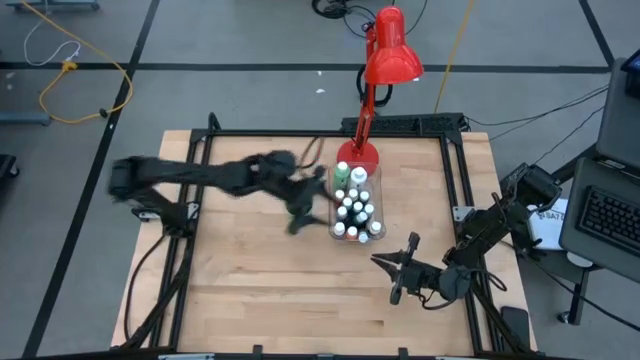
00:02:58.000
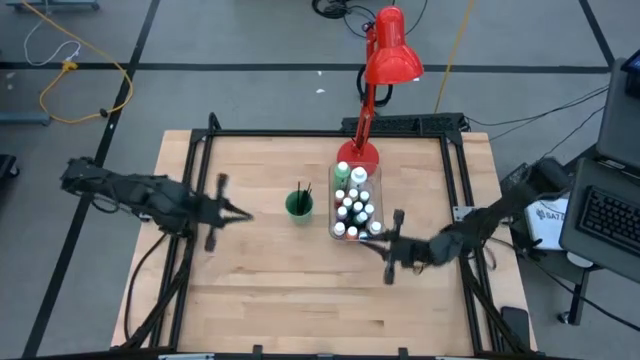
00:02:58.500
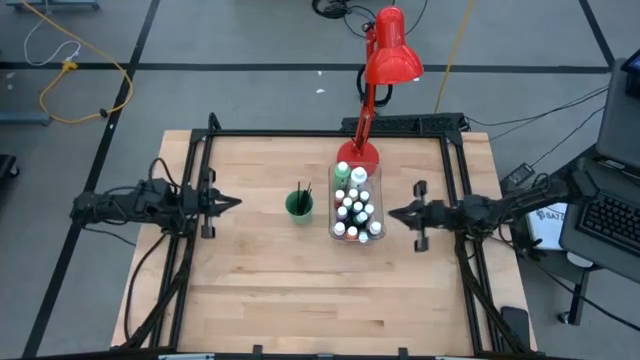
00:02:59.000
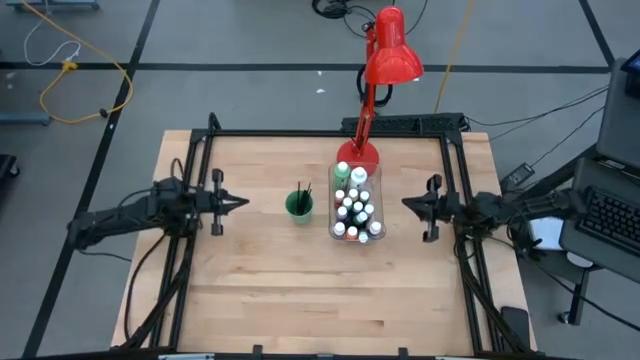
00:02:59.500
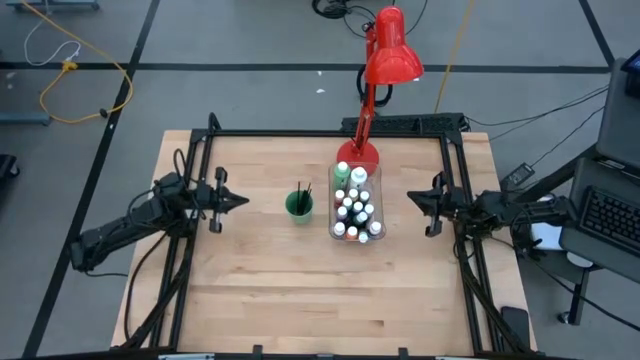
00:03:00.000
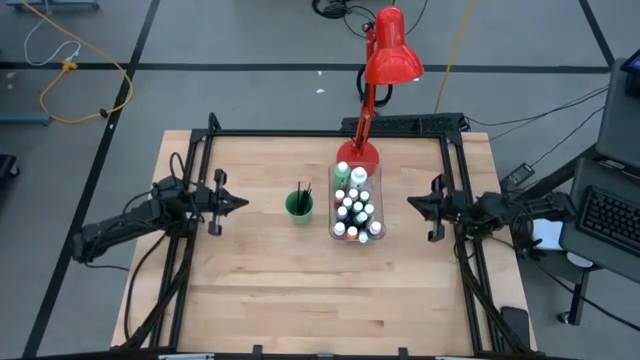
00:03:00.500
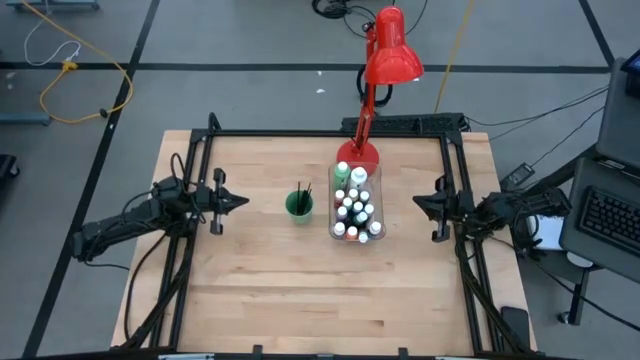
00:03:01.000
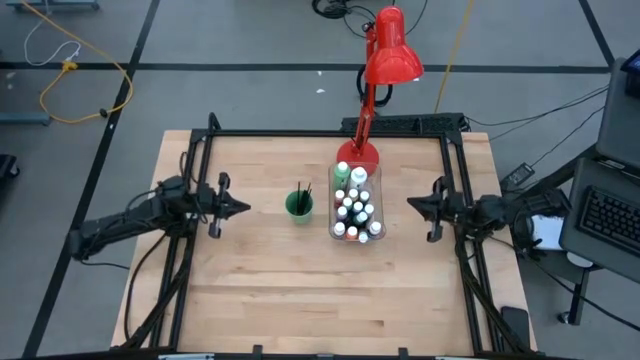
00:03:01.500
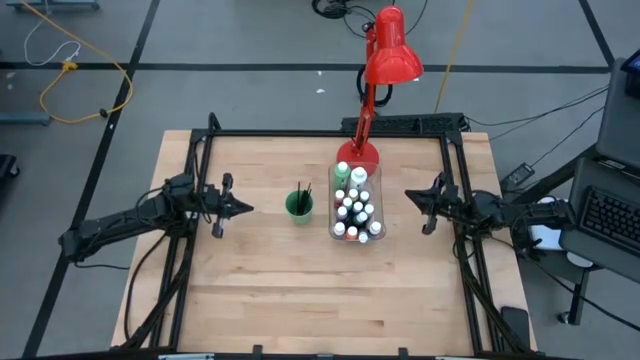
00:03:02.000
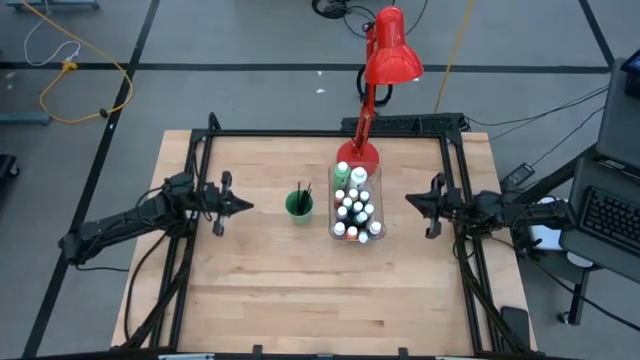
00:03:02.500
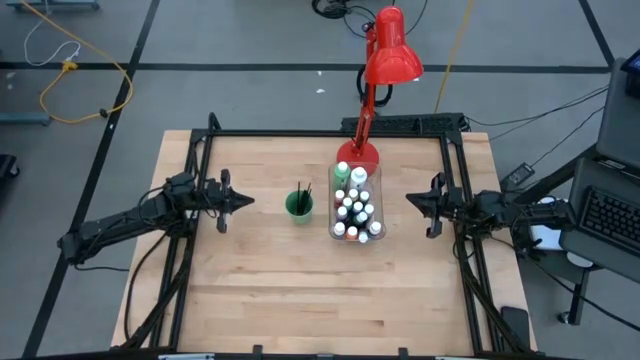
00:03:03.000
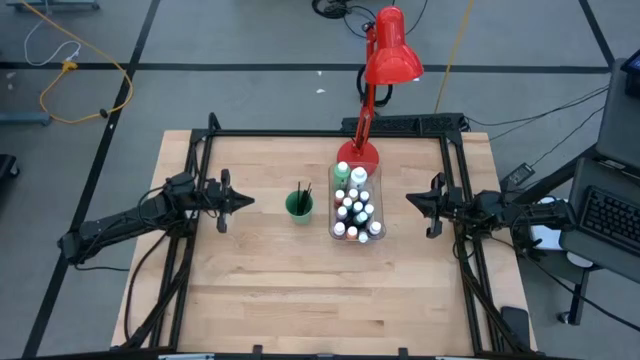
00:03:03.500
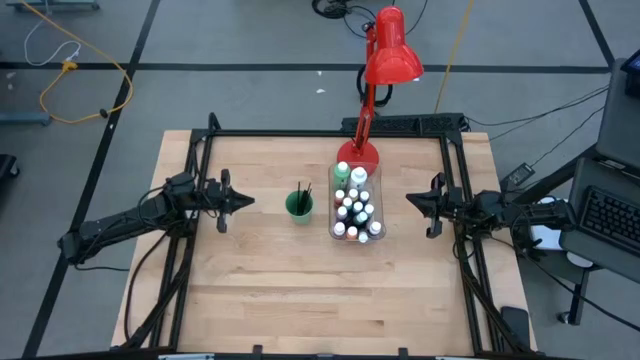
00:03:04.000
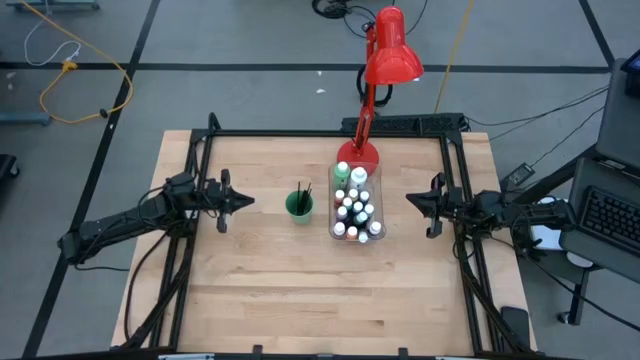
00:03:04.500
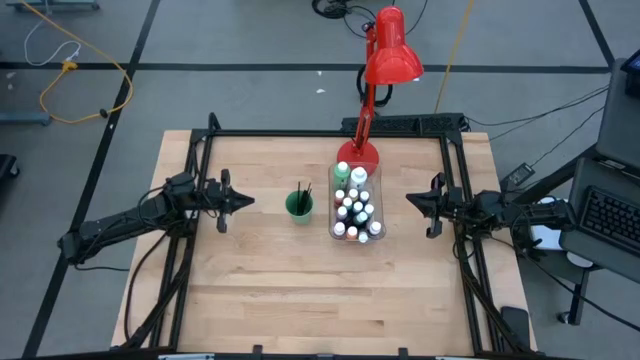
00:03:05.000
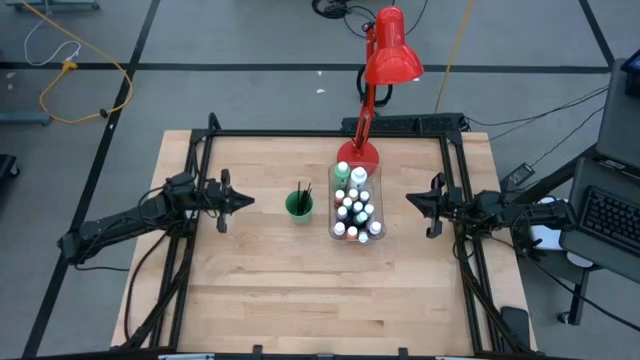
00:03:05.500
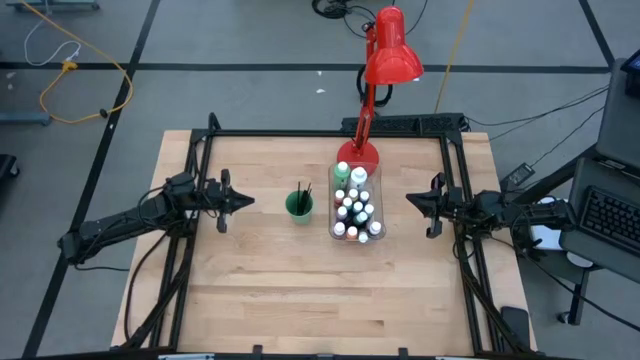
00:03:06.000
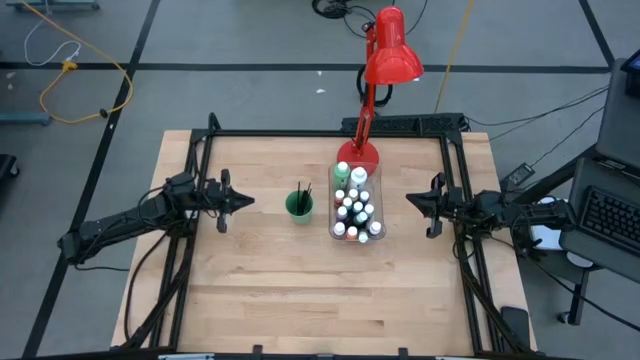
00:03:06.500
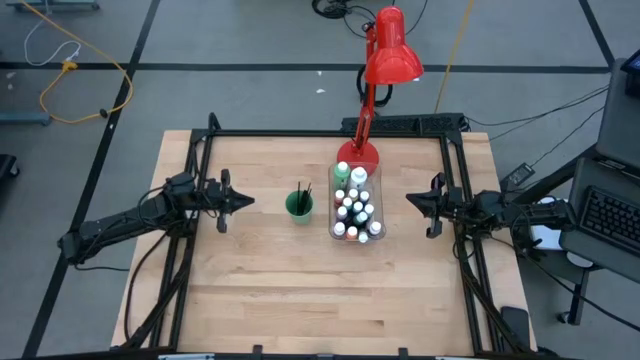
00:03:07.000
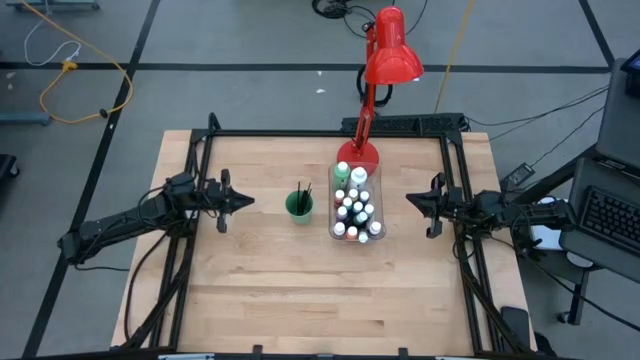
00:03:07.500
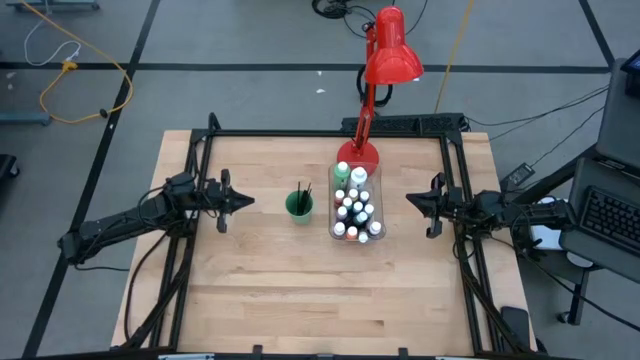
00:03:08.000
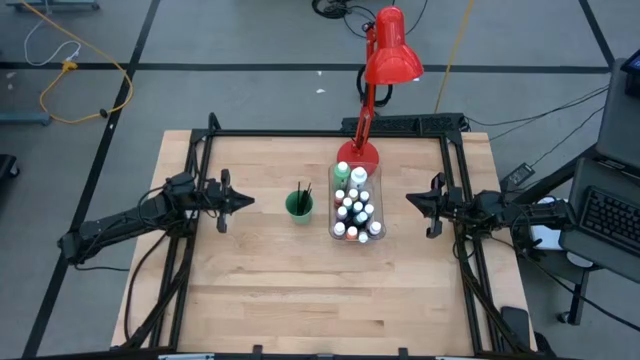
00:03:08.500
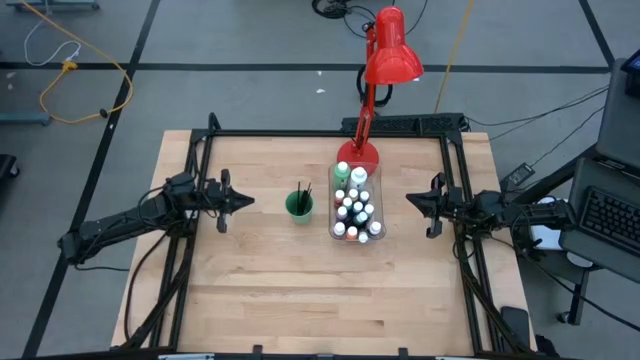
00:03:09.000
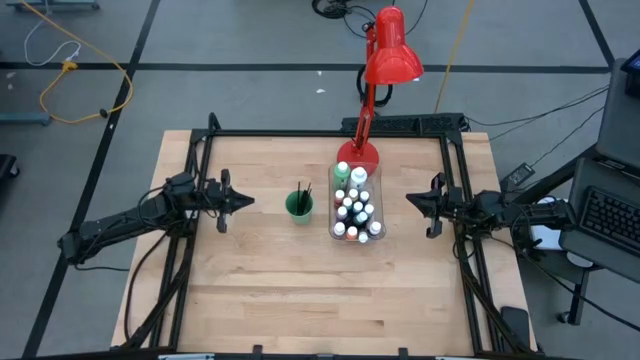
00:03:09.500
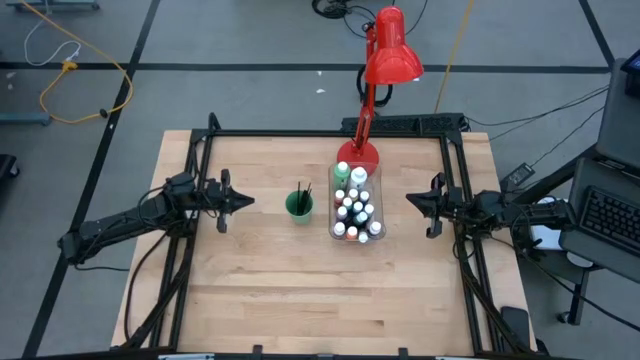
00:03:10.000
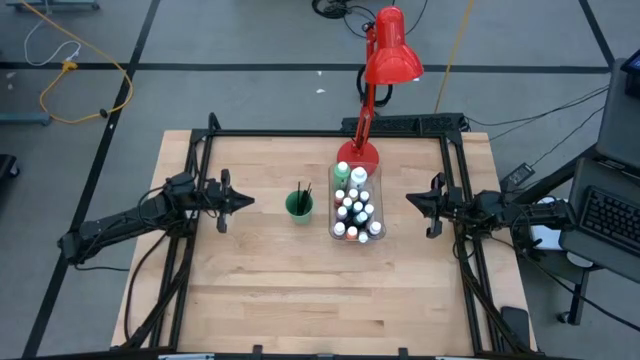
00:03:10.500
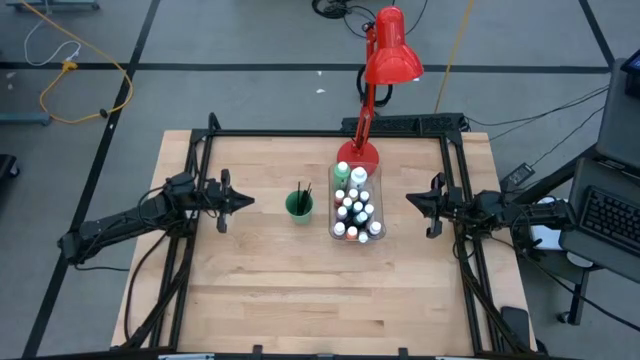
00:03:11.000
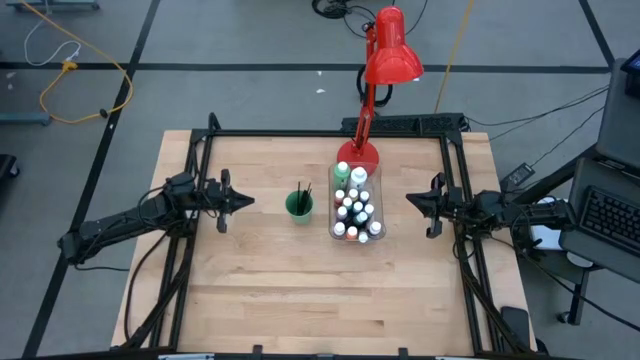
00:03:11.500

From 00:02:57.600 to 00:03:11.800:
Task: Pick & Place Paint Supplies
Return to Home Position

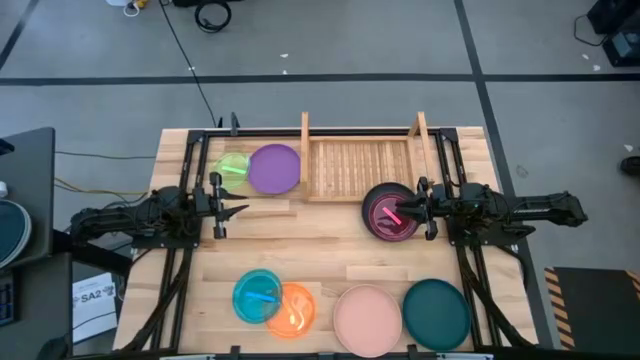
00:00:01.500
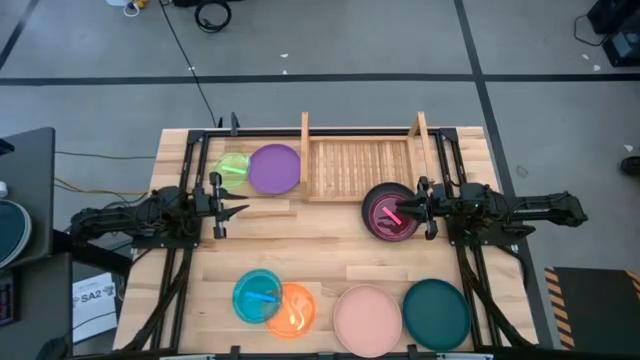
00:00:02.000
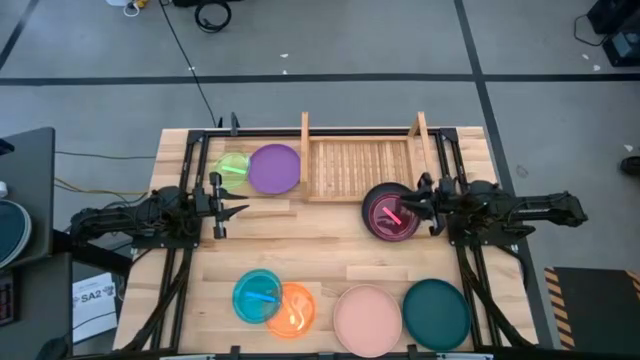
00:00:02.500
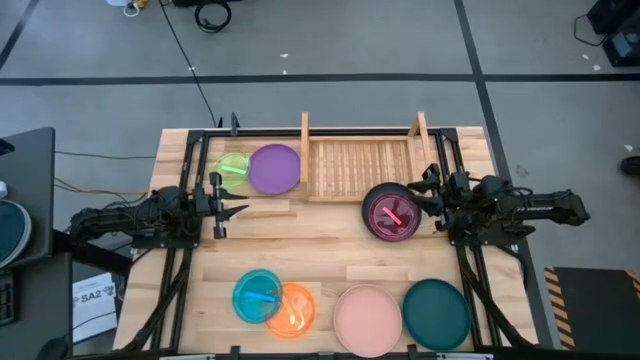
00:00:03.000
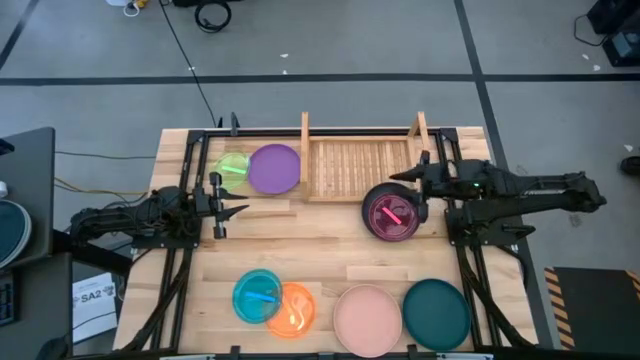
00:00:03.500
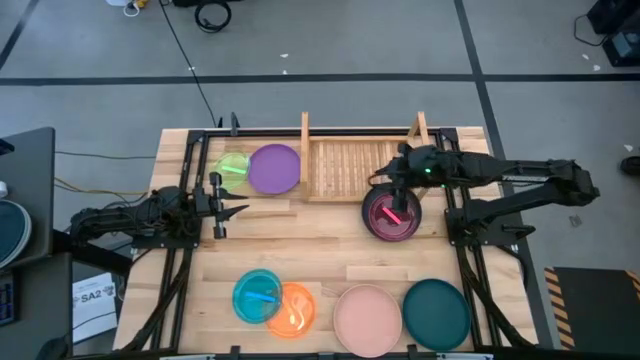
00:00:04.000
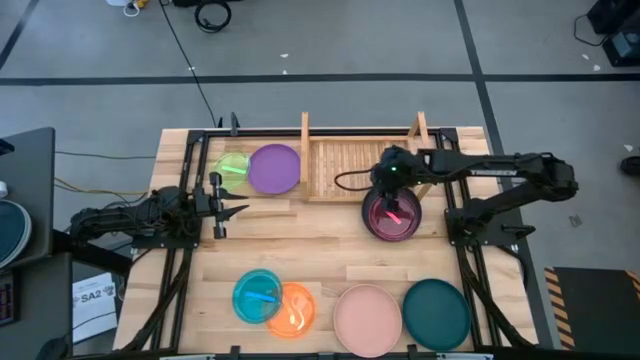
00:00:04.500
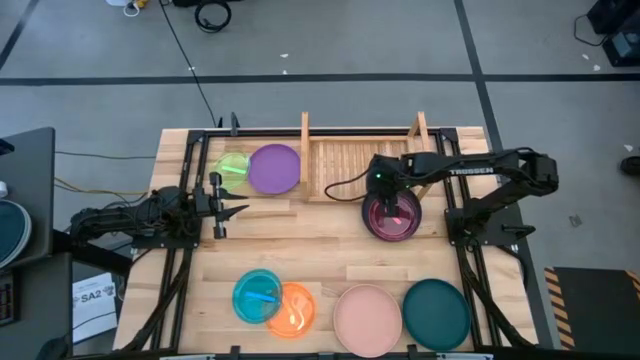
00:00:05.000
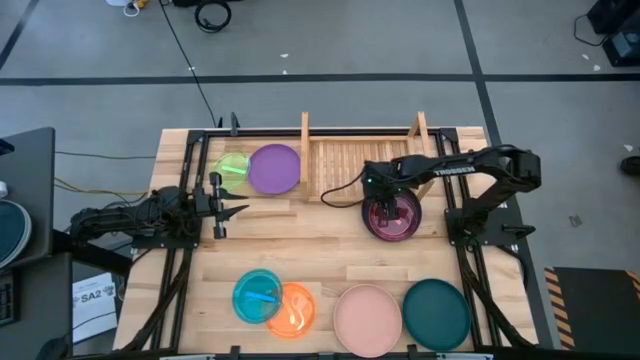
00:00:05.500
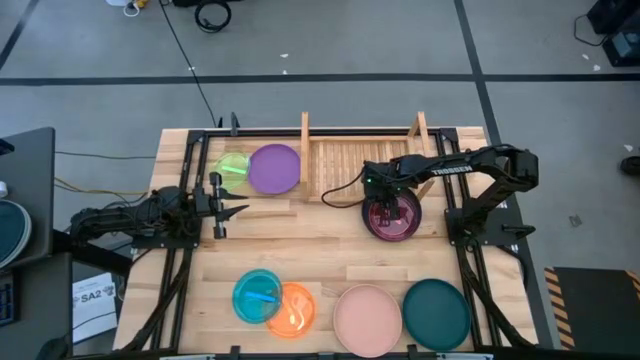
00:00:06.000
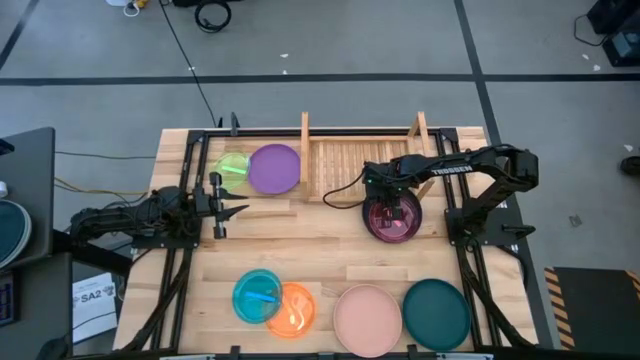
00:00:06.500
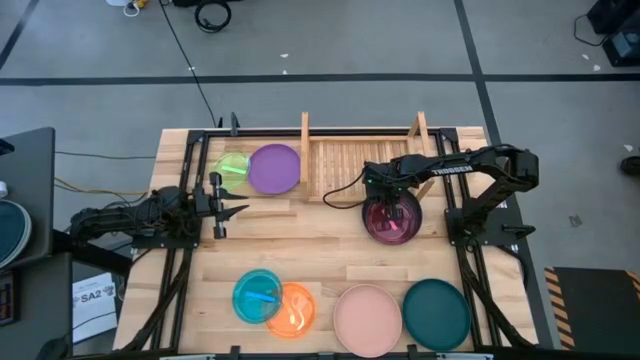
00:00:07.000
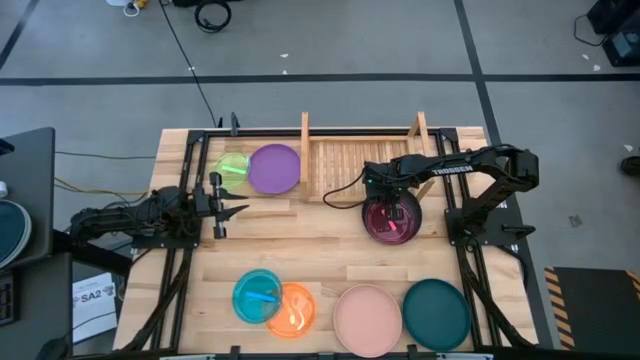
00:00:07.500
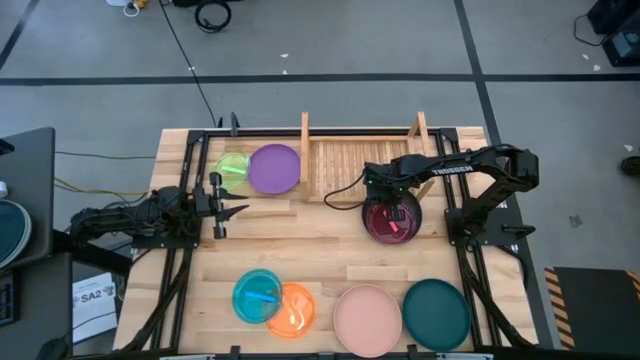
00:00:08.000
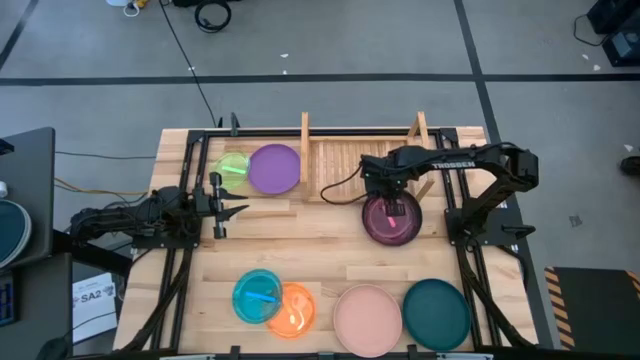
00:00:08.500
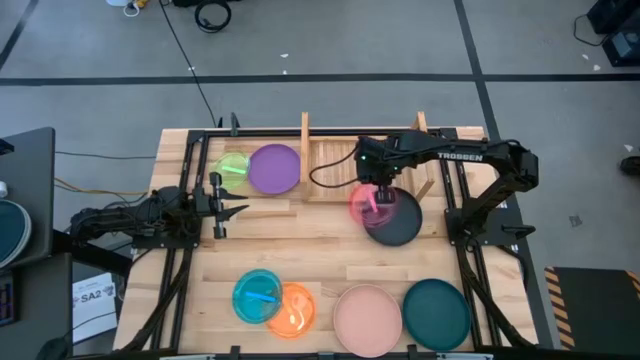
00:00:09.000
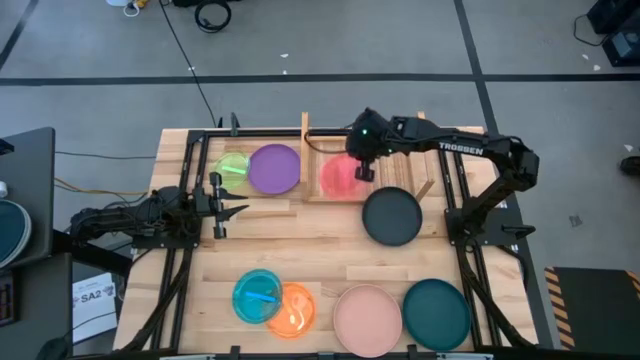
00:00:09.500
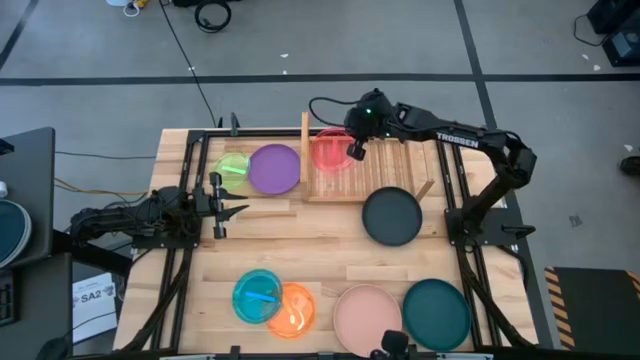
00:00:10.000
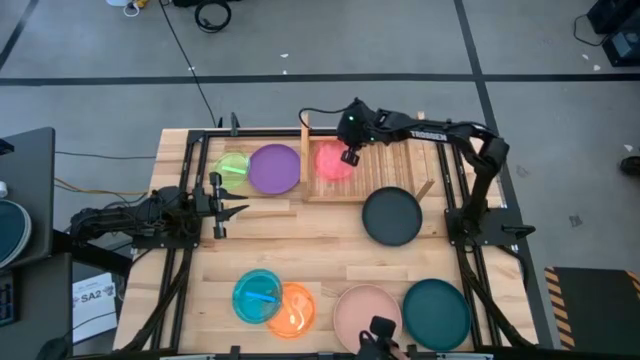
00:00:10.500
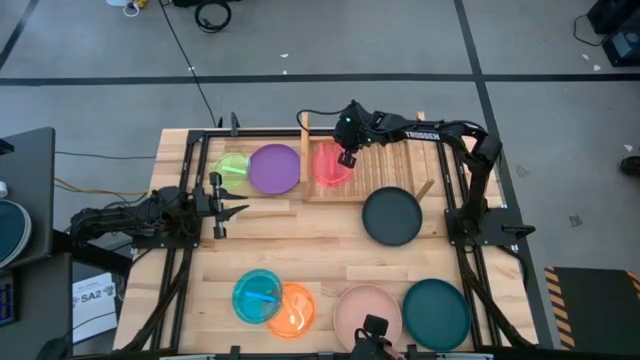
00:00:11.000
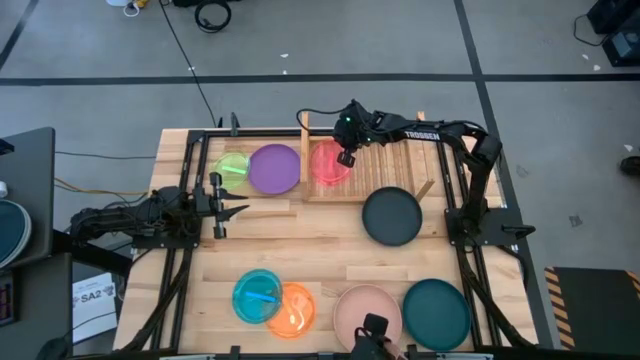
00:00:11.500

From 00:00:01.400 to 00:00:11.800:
Task: Place and stack plates onto a shelf
Put the small pink plate on the shelf
